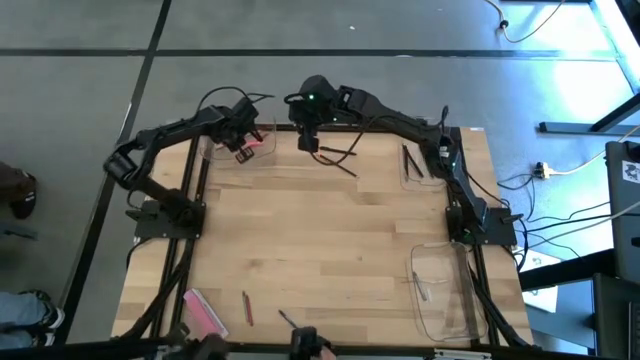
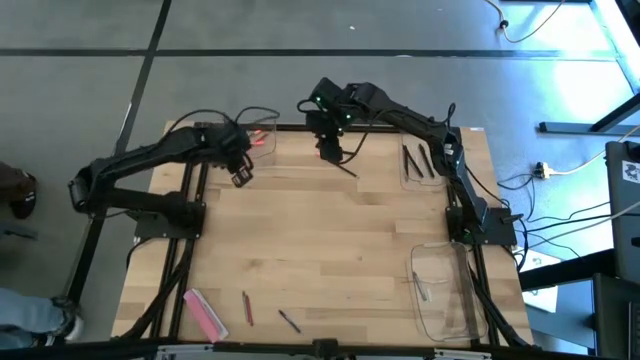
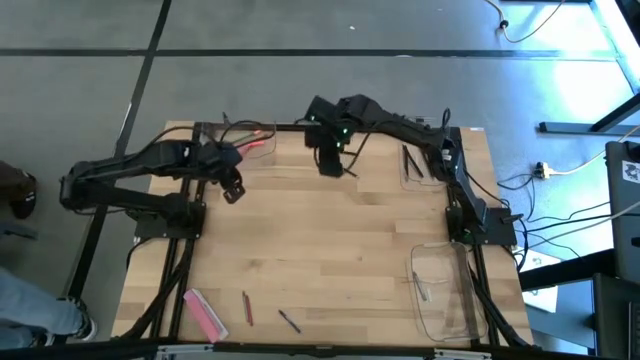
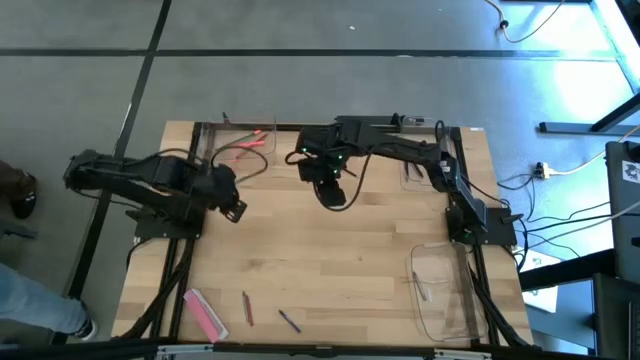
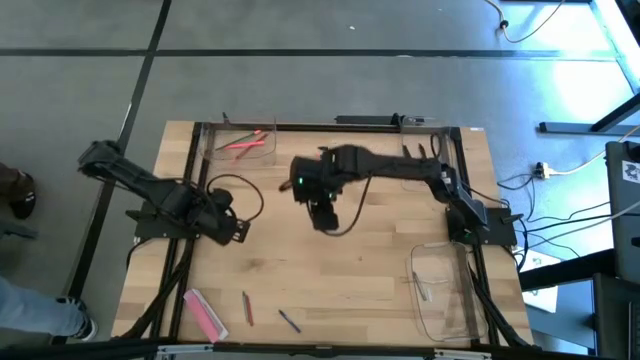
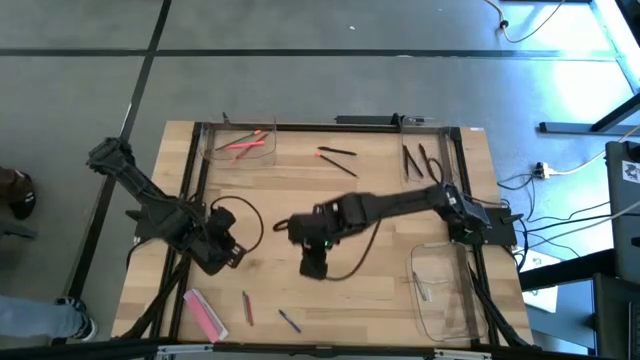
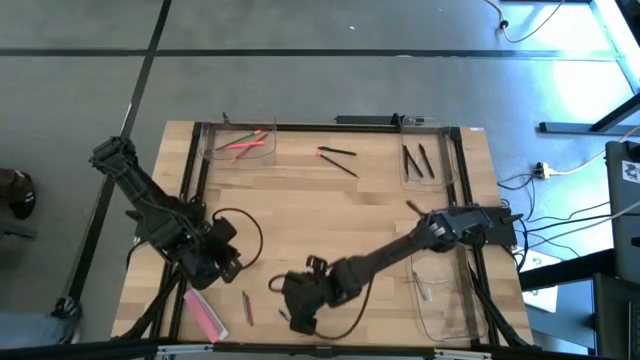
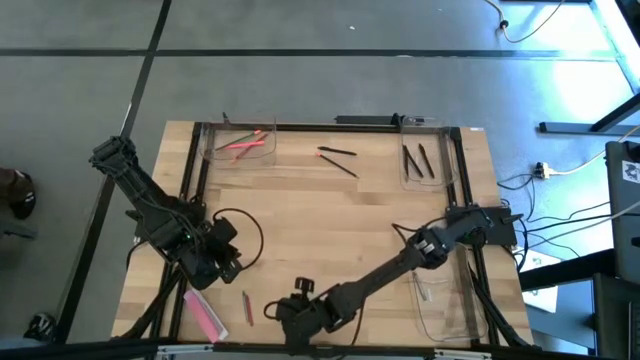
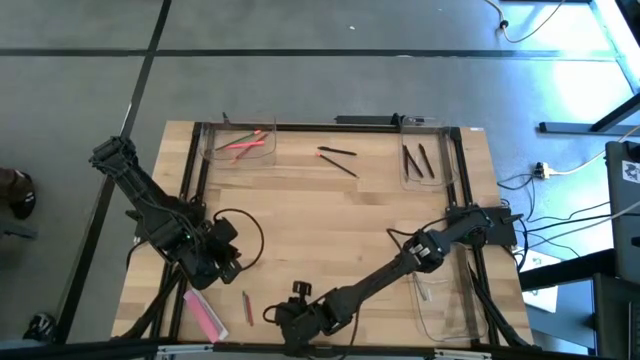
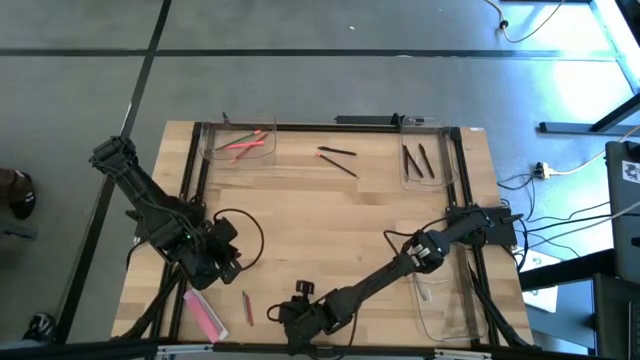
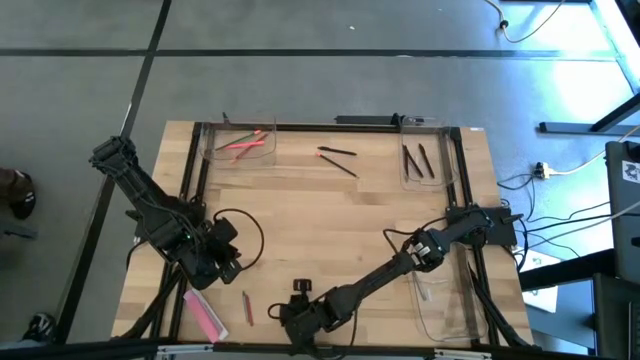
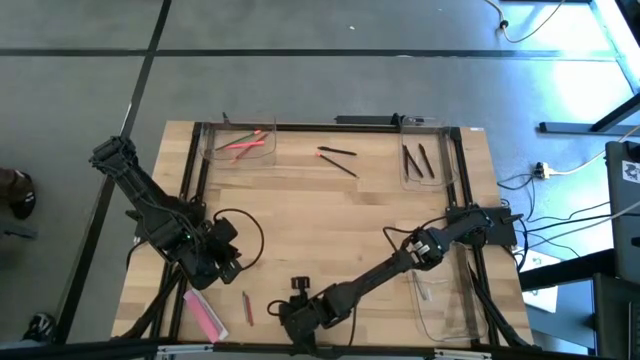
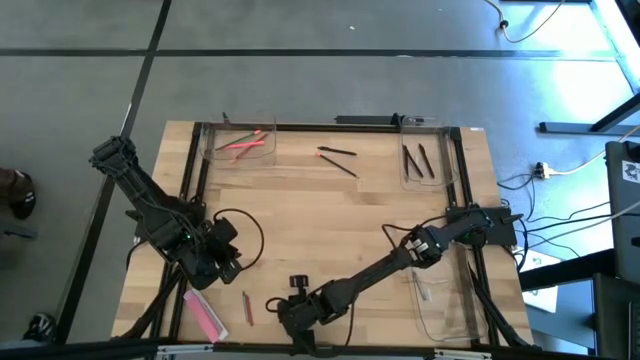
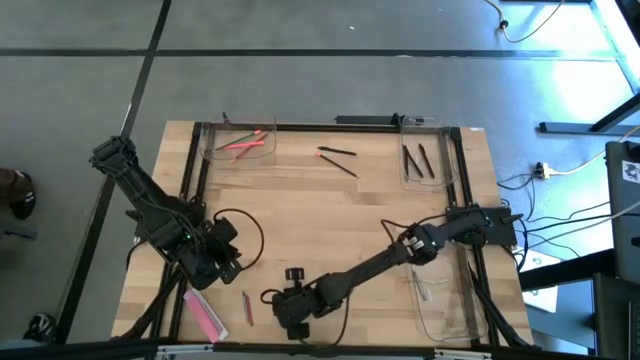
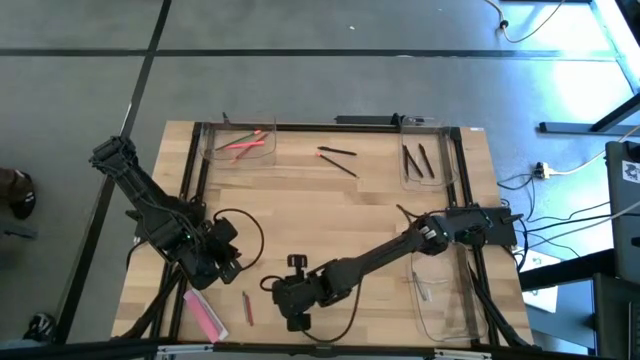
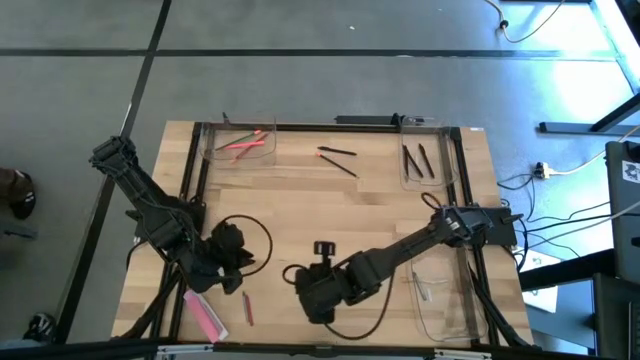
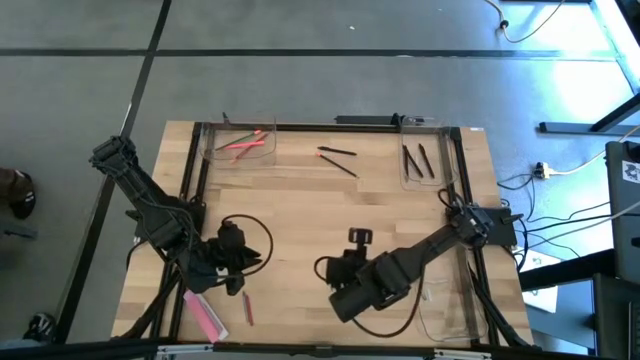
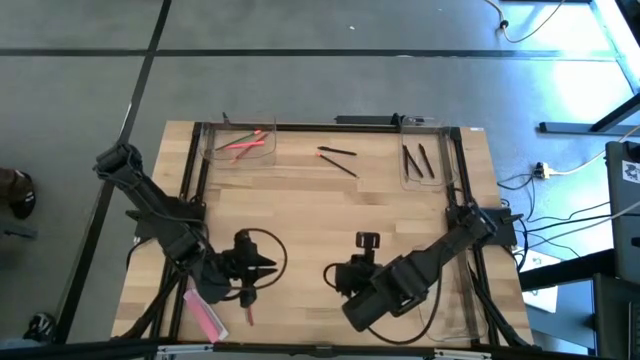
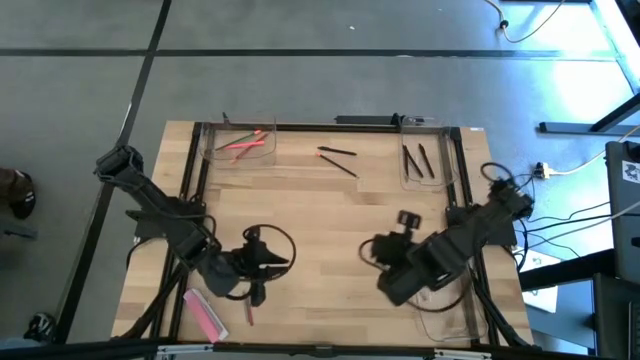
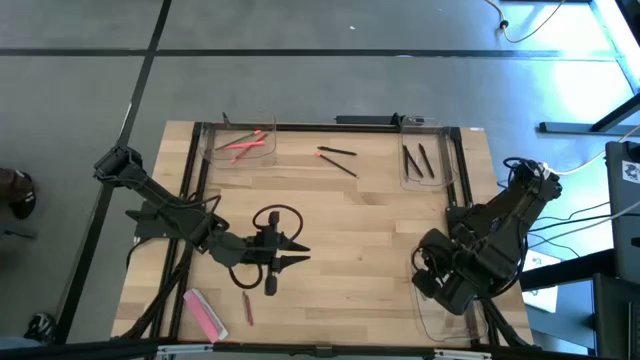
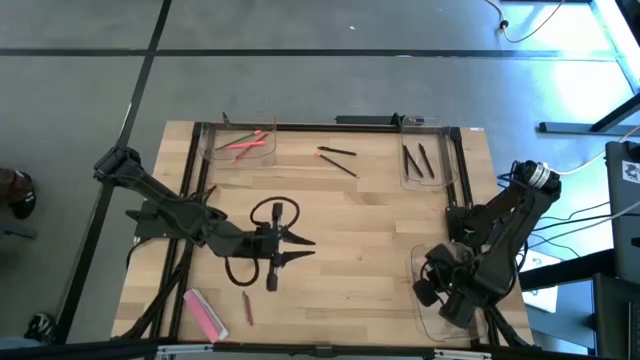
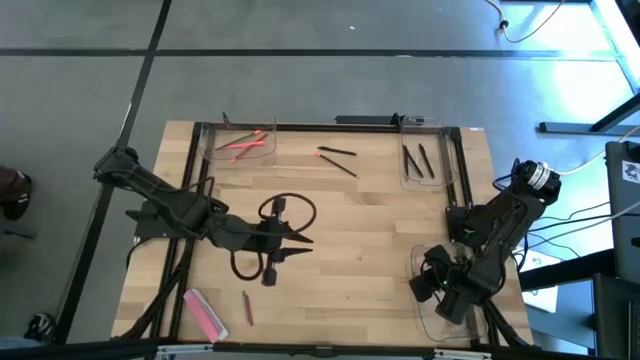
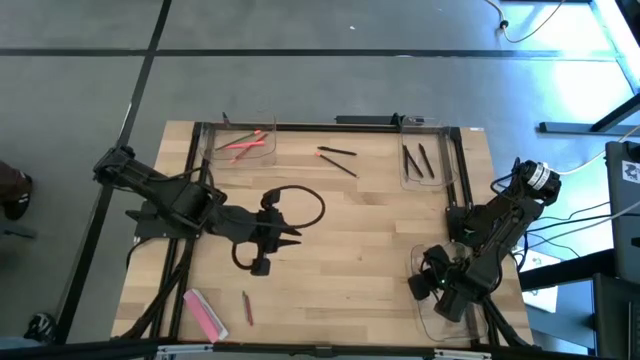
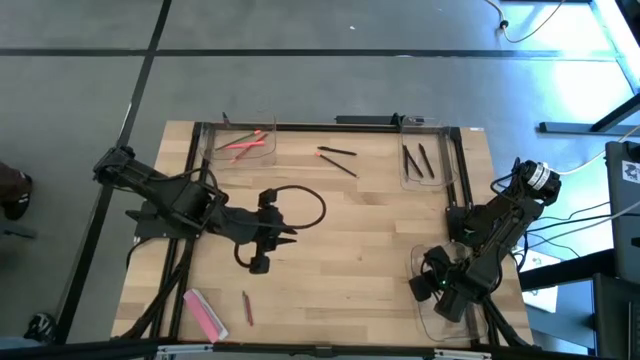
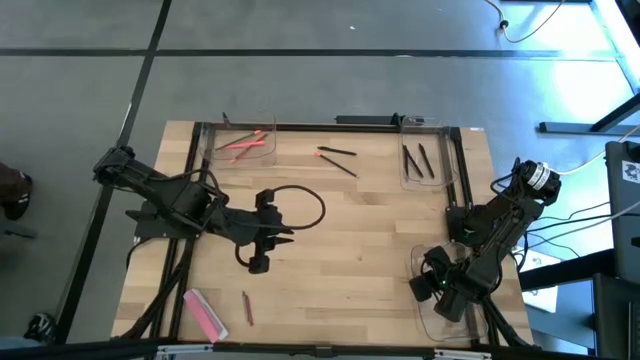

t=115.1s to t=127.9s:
Task: Sort crayons/erasers/pens/pencils in bins
Put the blue crayon into the bottom transparent bin

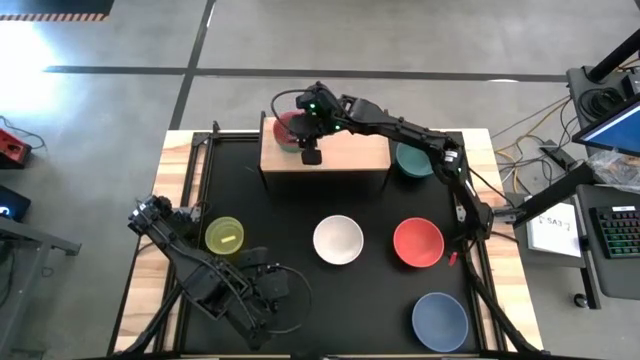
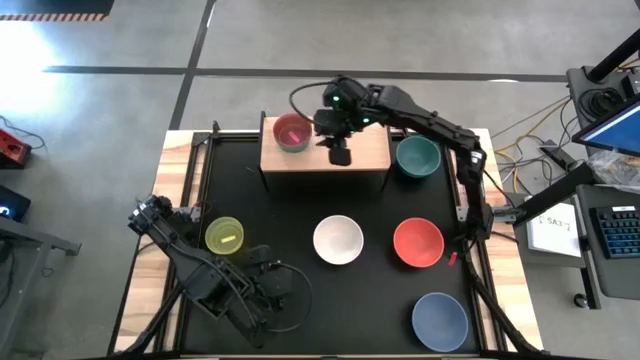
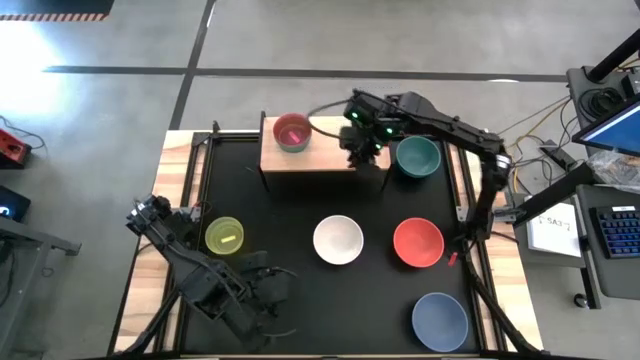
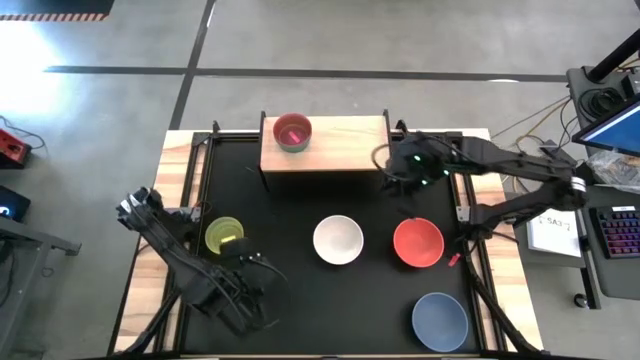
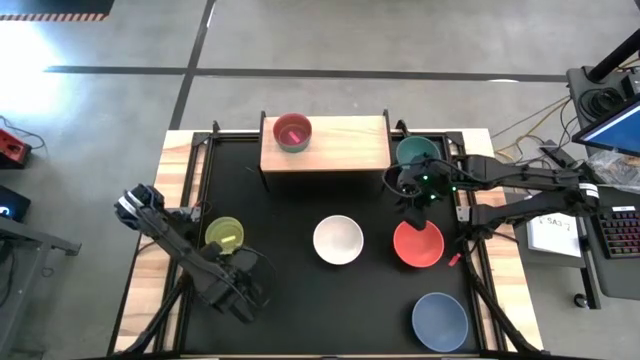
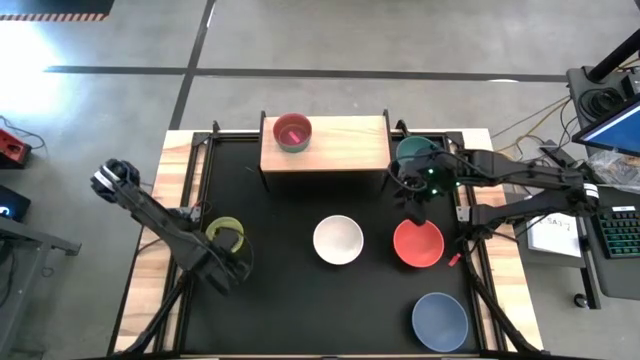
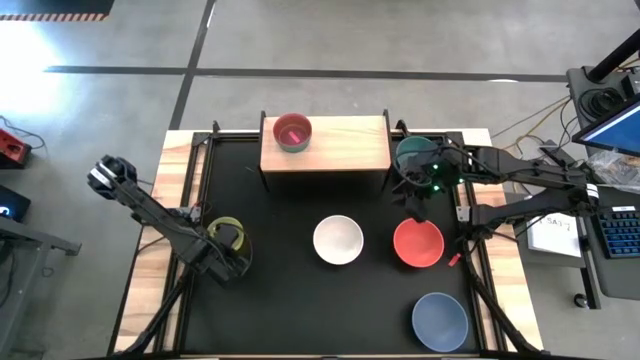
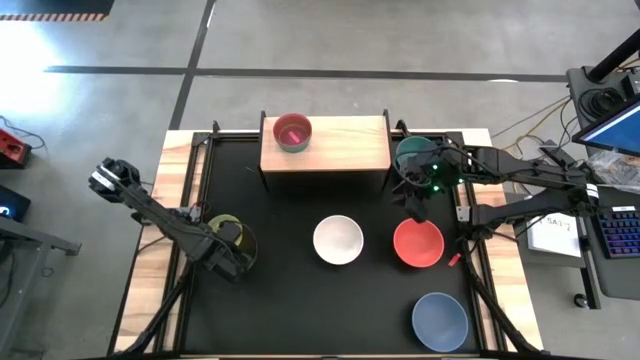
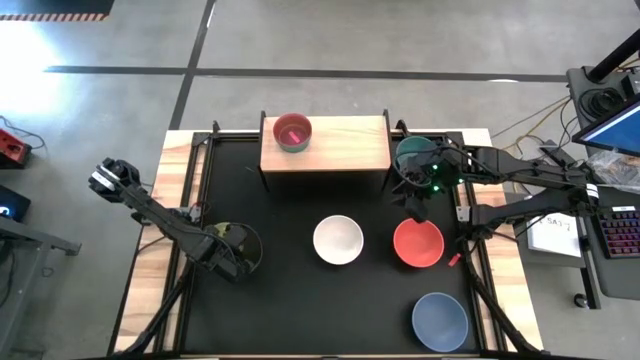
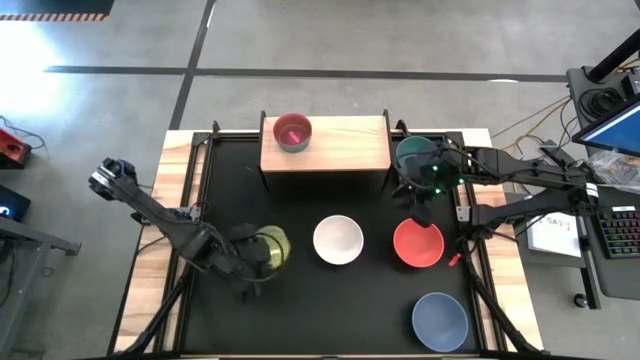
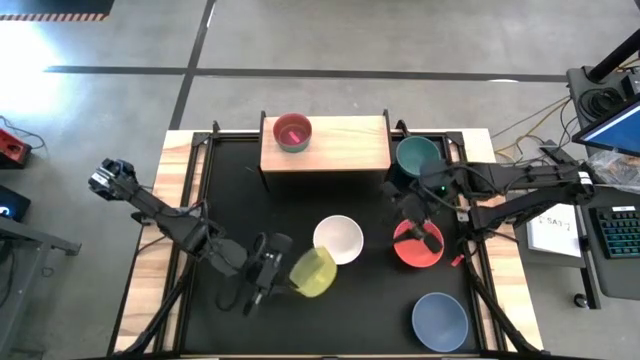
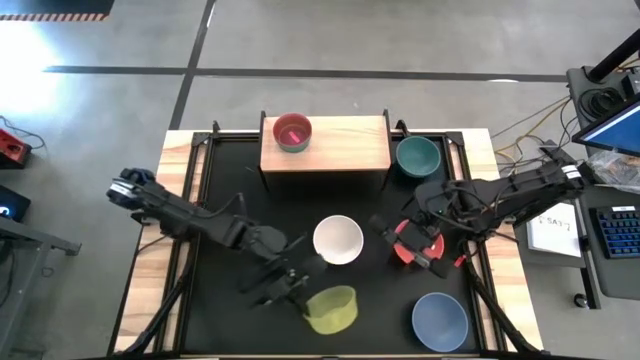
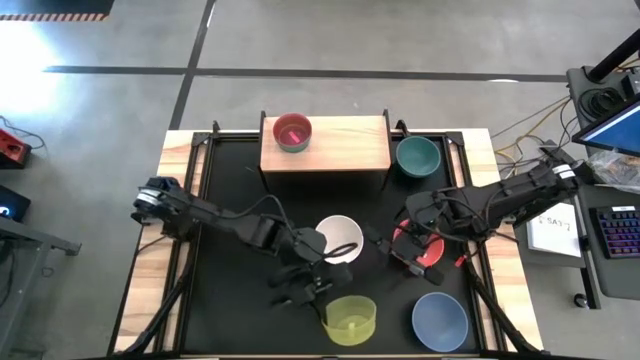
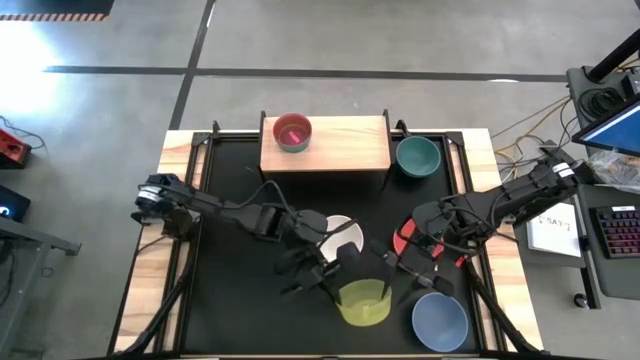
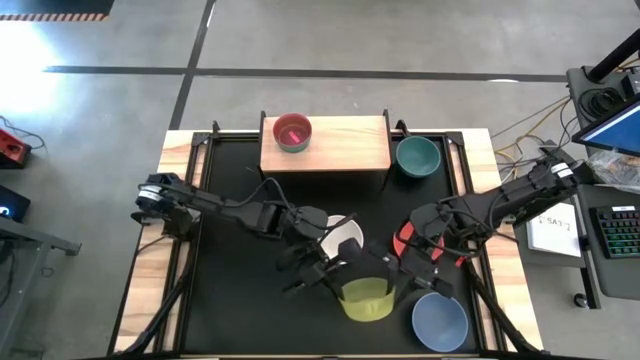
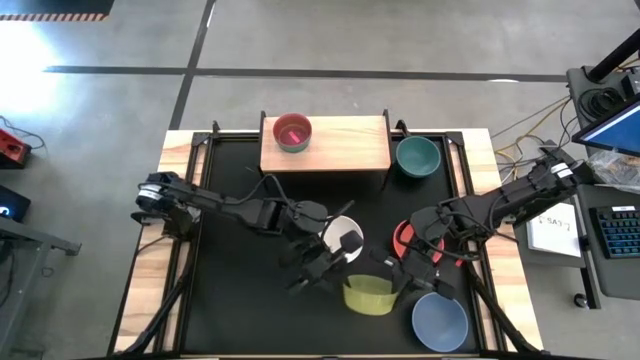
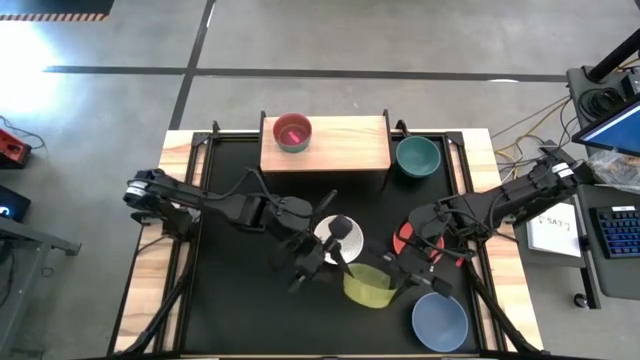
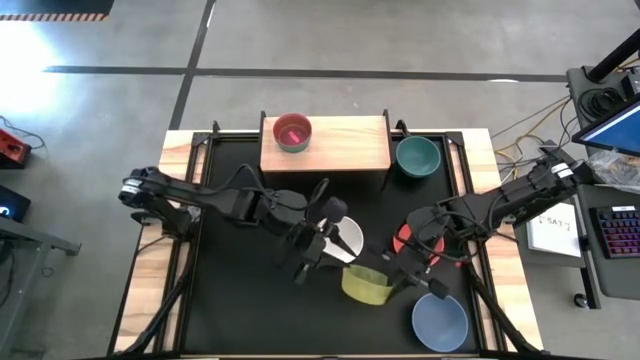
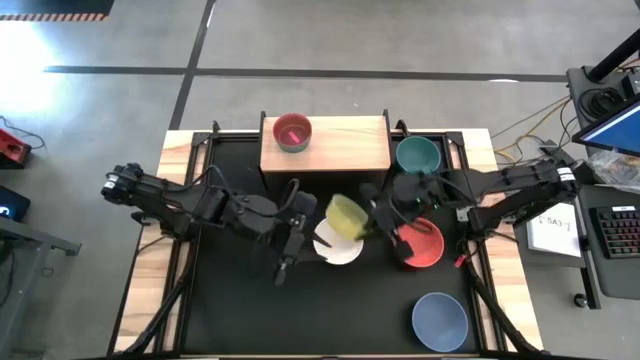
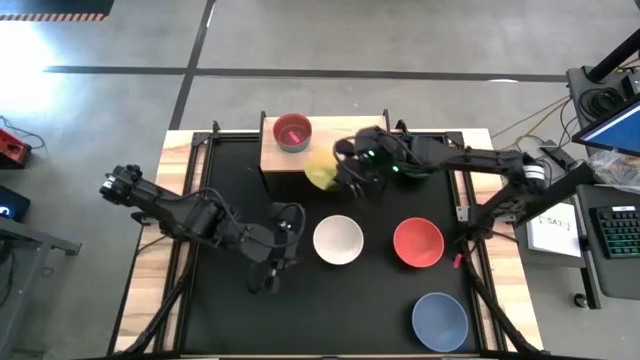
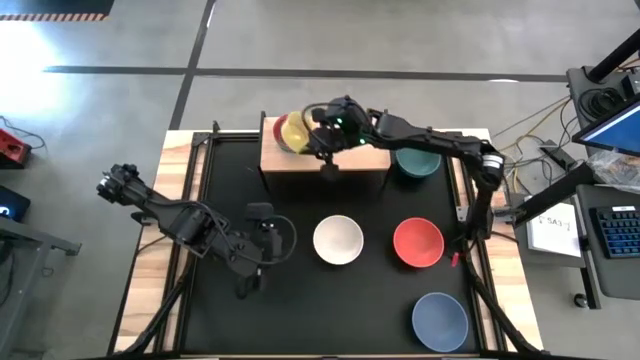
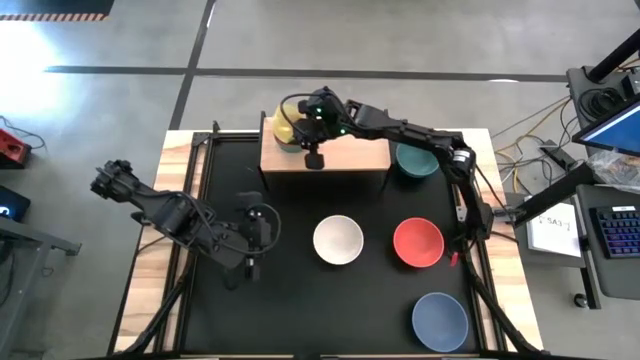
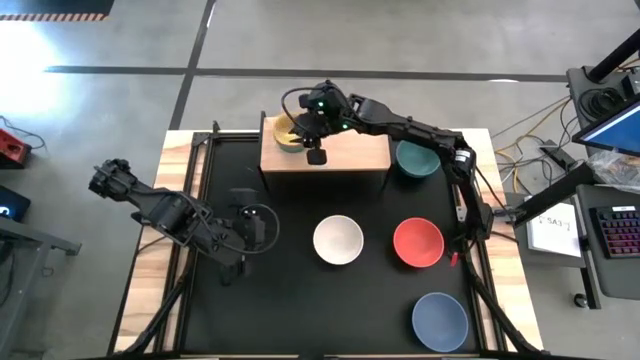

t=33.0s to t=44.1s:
Task: Place and stack bowls onto a shelf
Stack the small yellow bowl on top of the small pink bowl on the shelf
